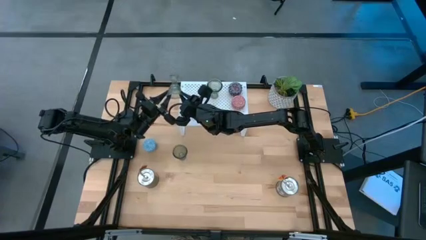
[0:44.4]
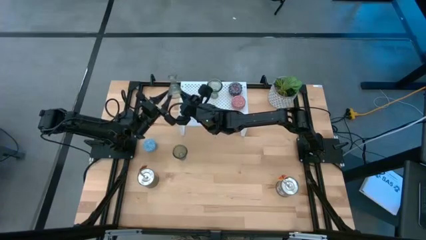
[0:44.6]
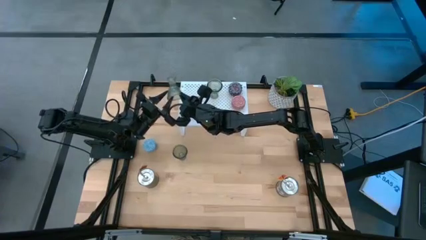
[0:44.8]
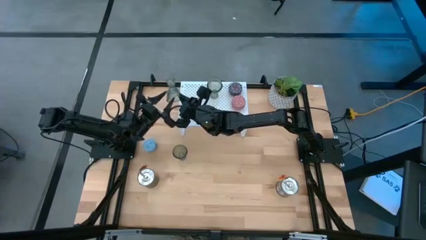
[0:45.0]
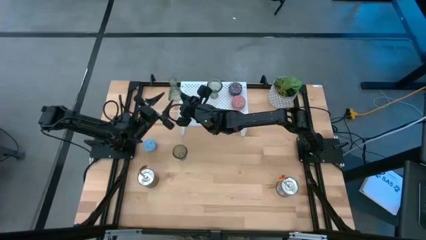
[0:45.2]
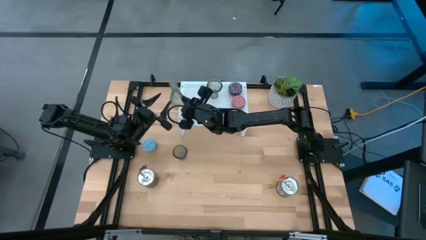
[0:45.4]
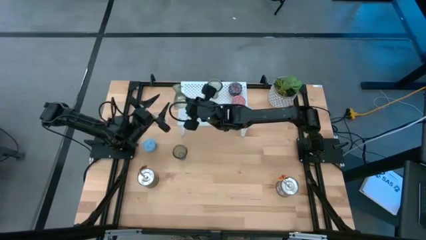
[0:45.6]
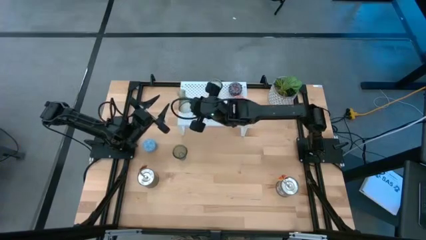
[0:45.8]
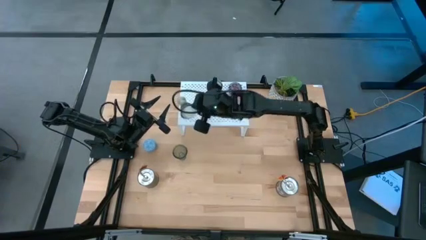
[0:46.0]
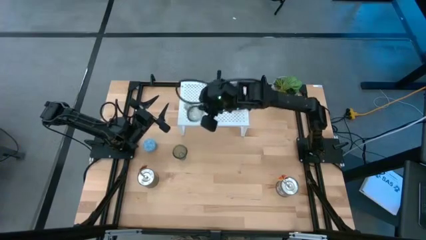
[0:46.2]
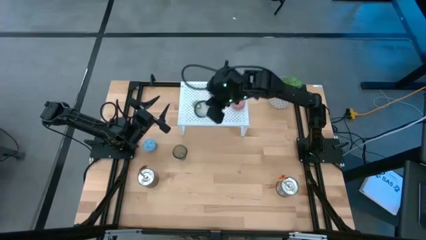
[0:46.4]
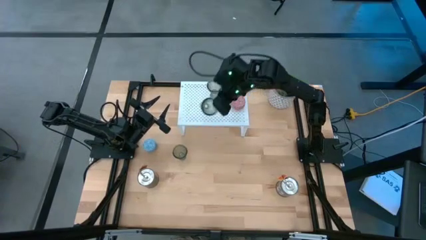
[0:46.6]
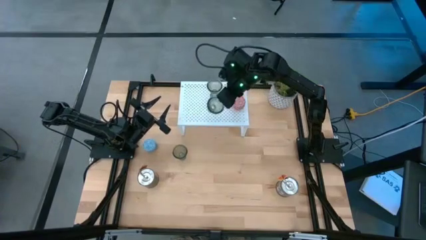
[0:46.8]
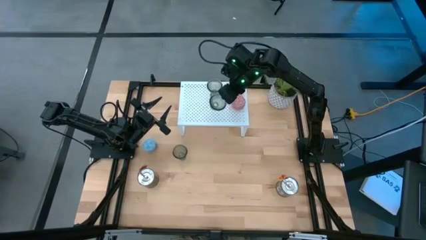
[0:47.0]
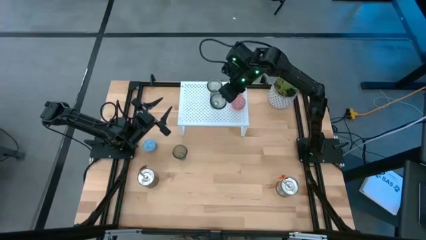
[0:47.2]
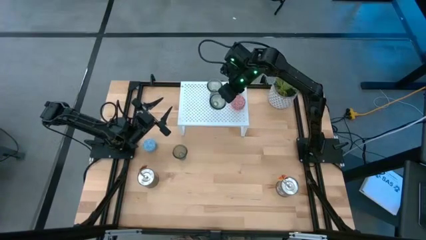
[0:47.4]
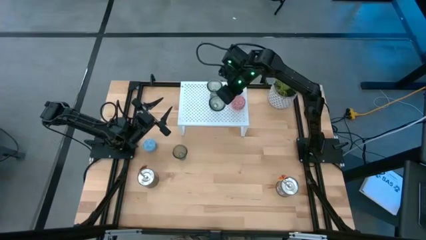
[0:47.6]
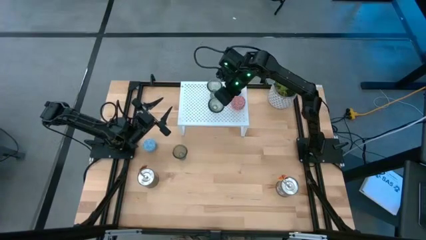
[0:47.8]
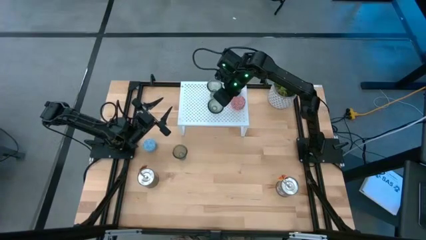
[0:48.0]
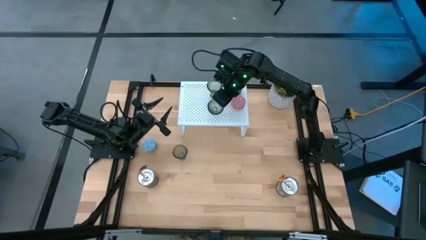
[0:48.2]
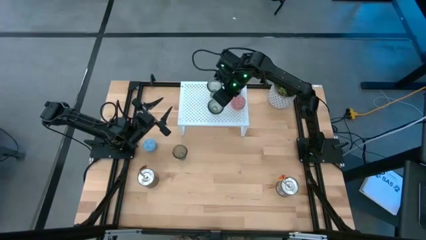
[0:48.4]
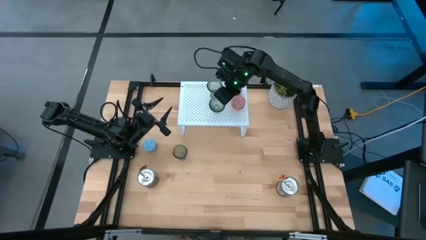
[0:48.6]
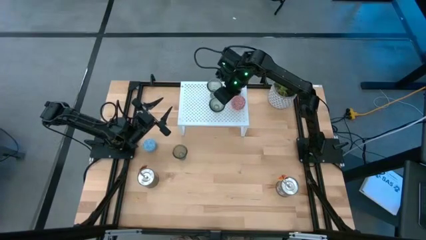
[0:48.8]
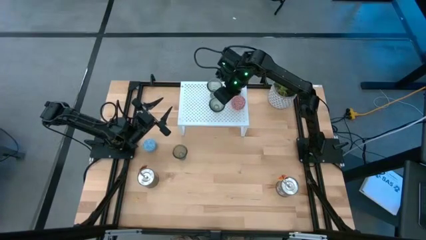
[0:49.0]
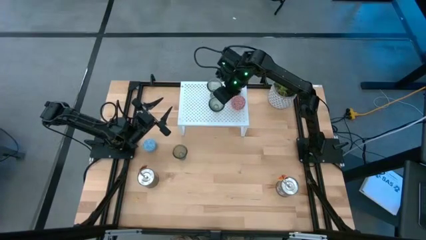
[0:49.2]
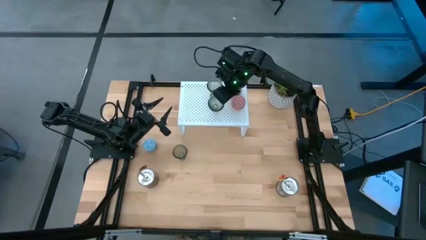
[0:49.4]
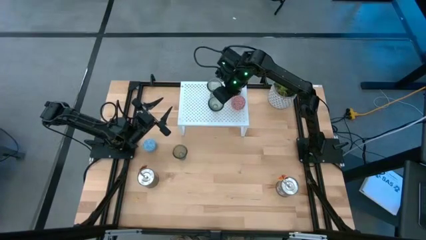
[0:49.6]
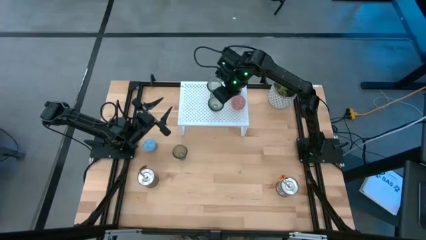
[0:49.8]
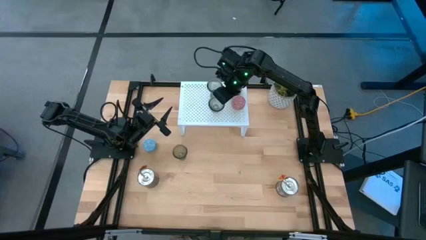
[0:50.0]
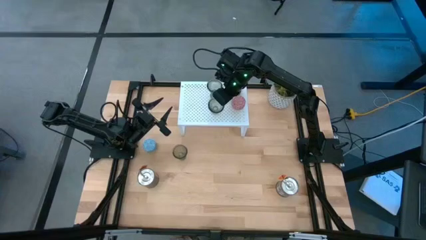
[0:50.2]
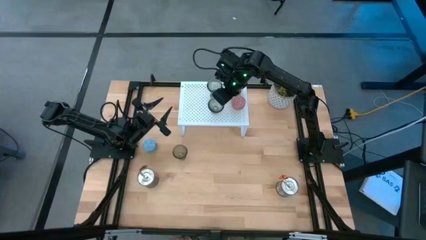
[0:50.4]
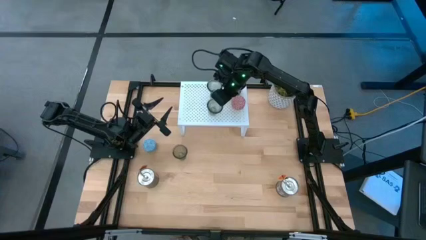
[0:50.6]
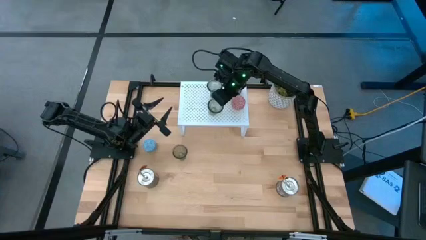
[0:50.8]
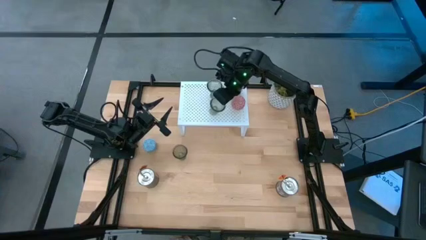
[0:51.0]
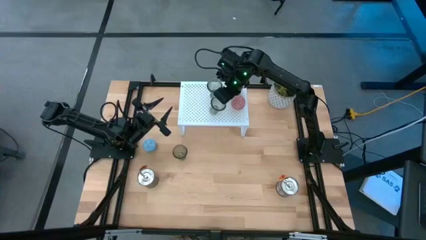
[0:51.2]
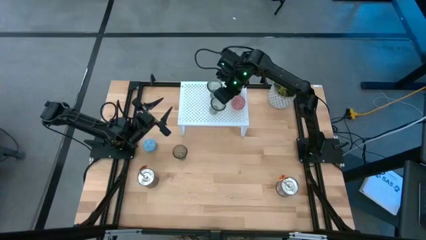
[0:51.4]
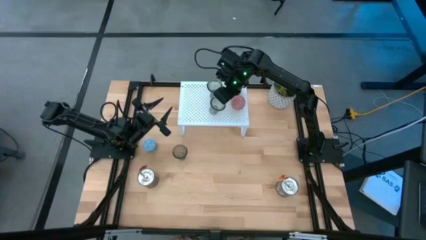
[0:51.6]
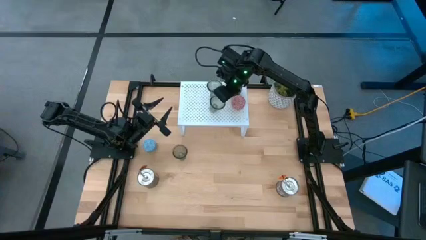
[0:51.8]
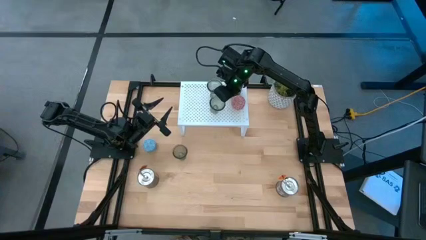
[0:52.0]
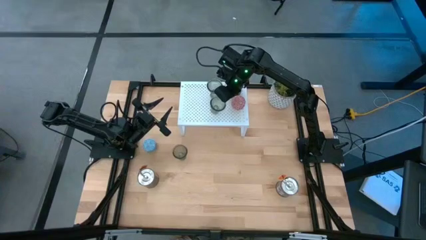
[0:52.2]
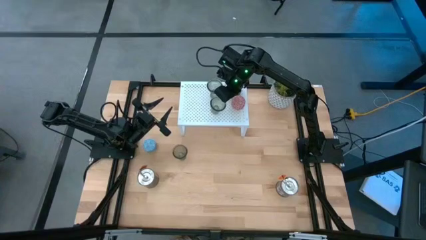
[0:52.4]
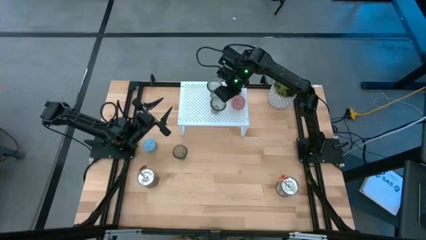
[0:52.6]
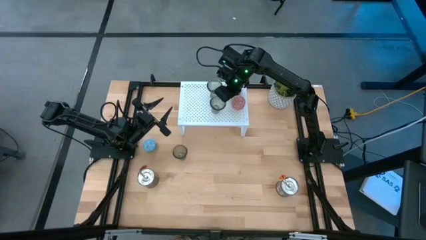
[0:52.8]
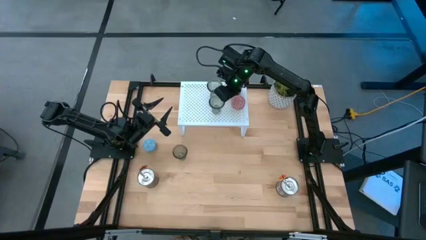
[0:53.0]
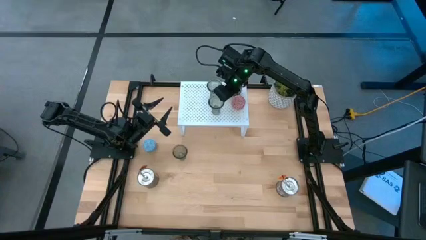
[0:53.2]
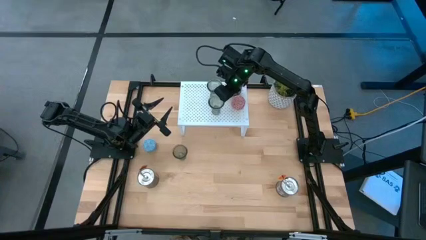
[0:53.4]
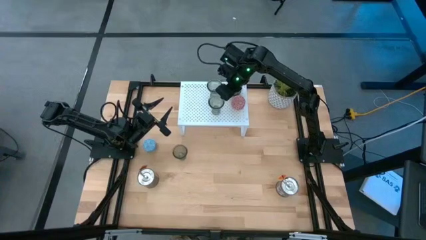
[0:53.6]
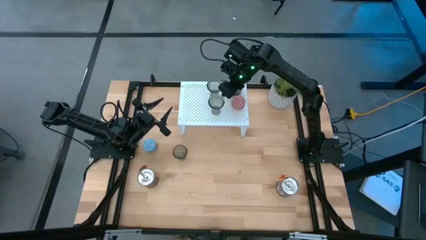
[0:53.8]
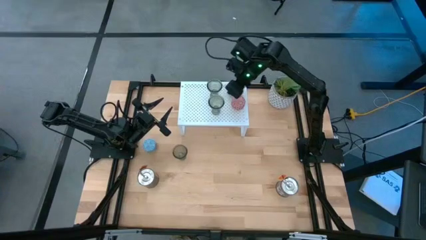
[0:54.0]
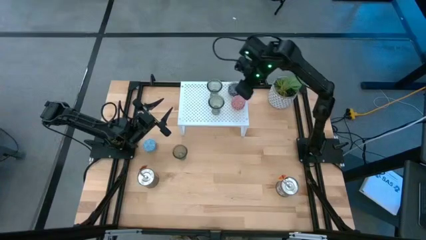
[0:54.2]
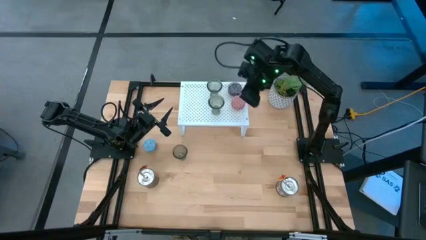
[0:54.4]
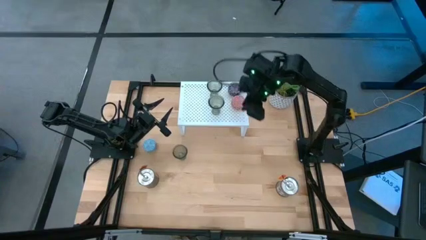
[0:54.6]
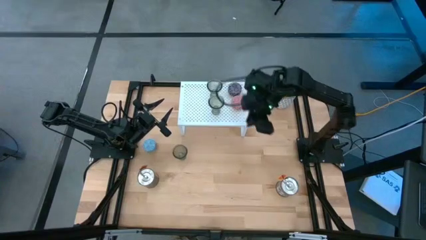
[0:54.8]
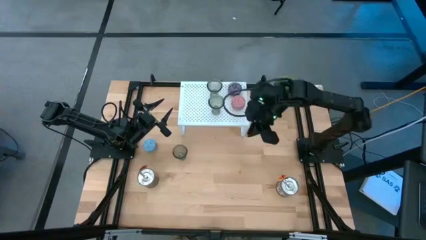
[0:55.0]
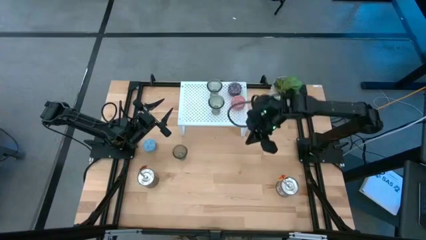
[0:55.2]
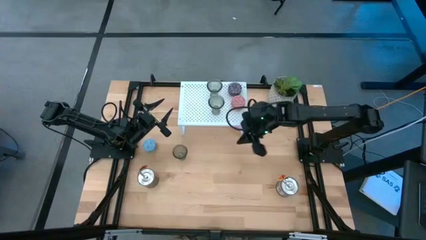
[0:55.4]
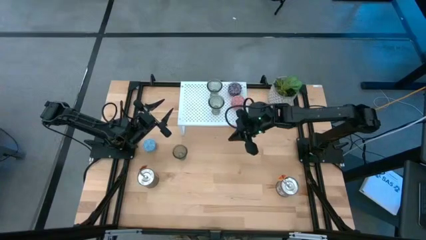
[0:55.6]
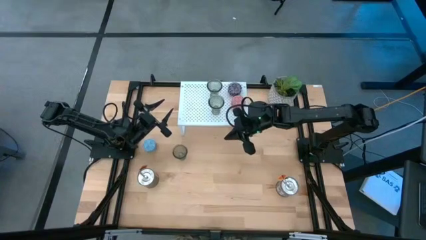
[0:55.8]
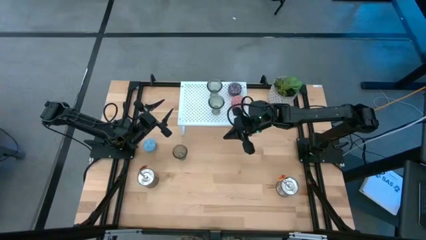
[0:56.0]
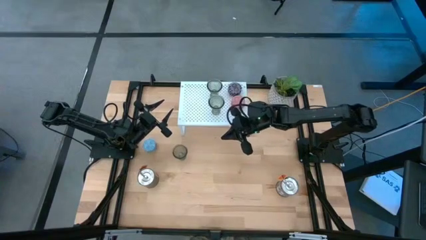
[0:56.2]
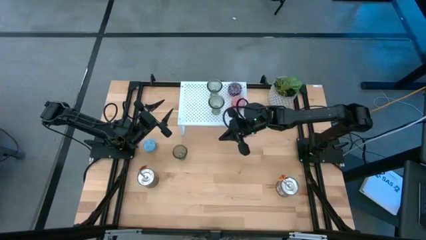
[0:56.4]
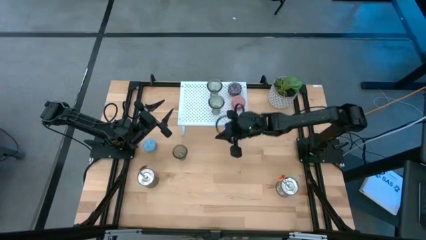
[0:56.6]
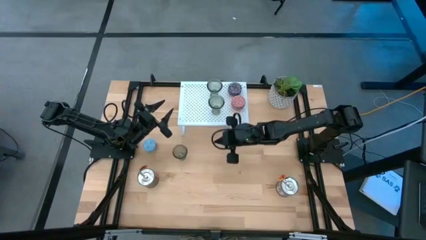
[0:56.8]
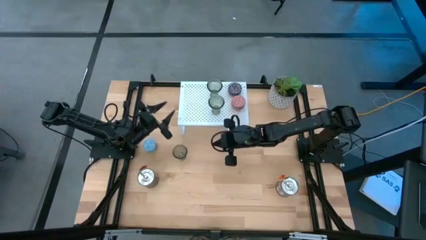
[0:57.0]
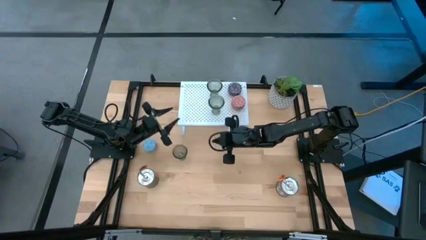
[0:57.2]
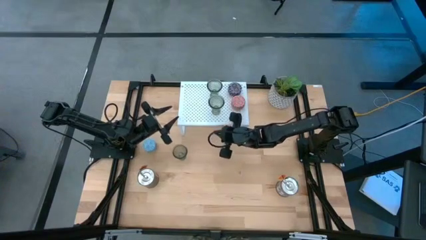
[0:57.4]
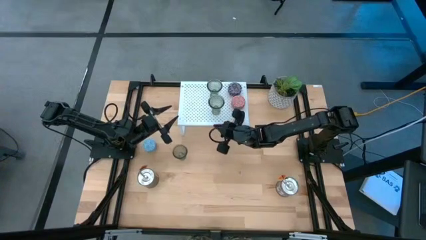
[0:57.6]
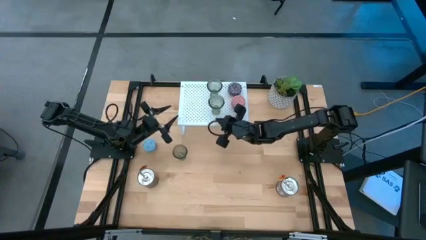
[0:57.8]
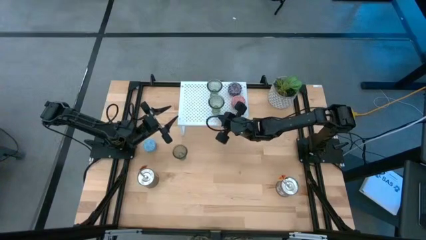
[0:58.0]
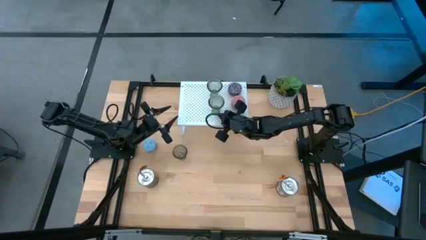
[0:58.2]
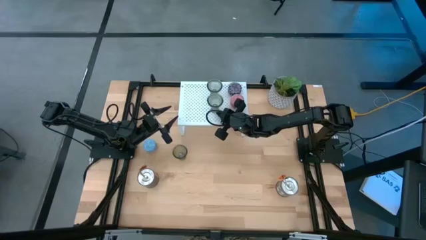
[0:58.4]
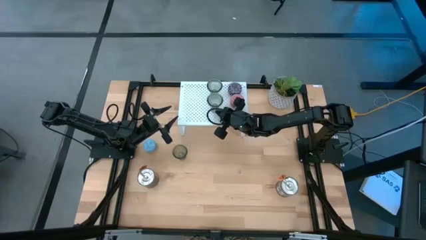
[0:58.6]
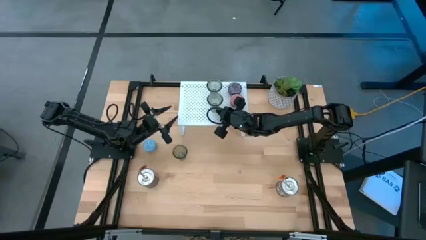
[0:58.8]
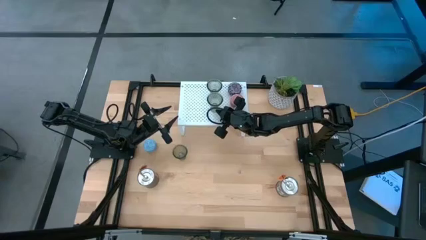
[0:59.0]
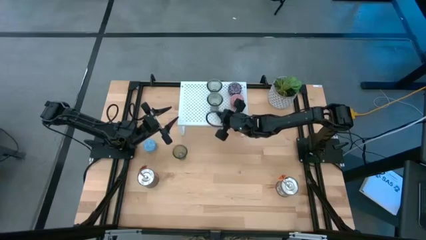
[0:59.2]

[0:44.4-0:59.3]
Task: Pick & Place candle stick holders
Put the right green glass candle holder on the shelf aligned with the other glass candle holder
